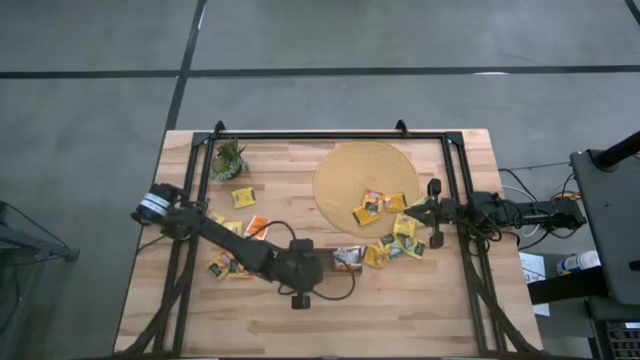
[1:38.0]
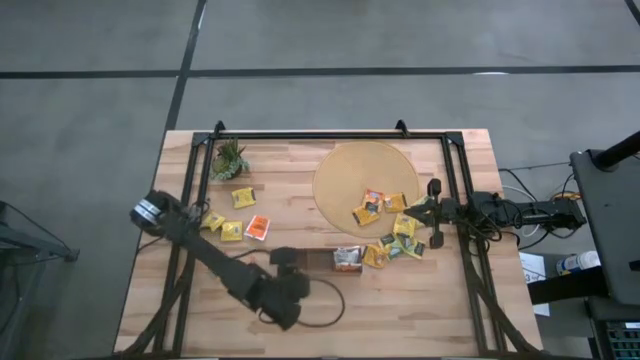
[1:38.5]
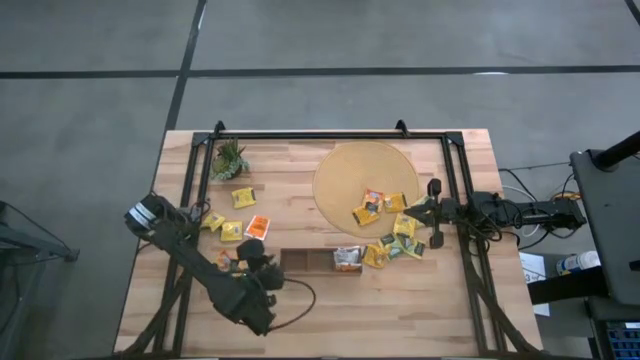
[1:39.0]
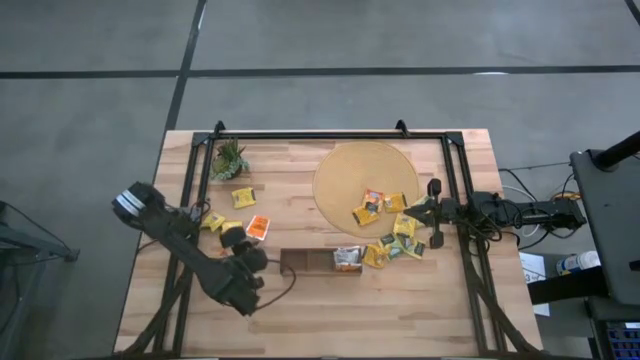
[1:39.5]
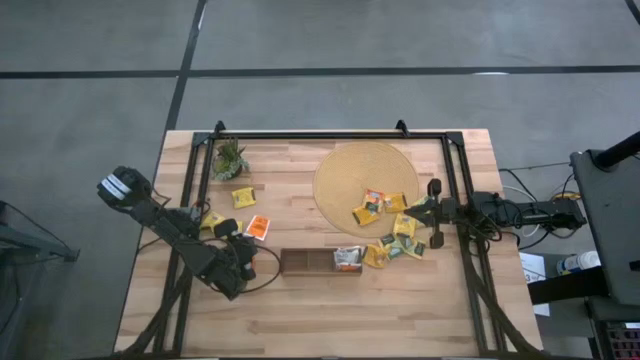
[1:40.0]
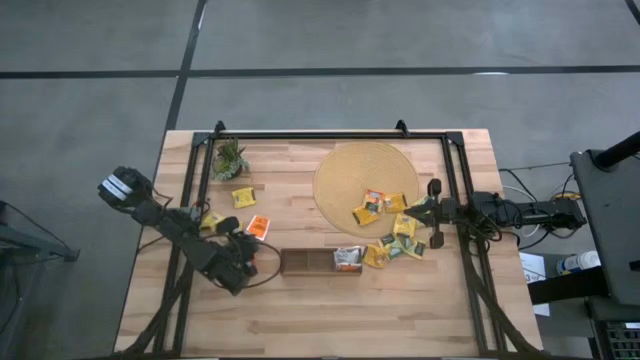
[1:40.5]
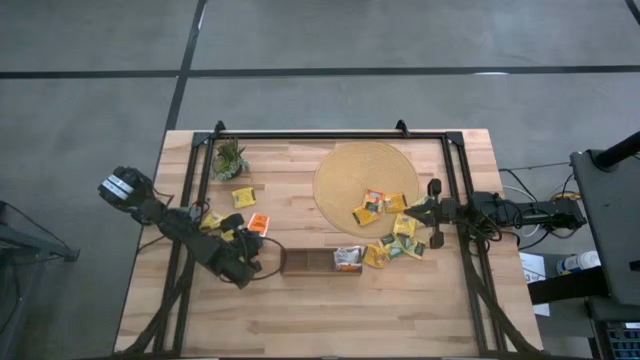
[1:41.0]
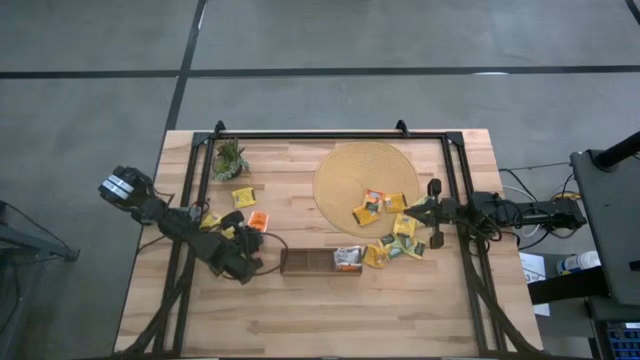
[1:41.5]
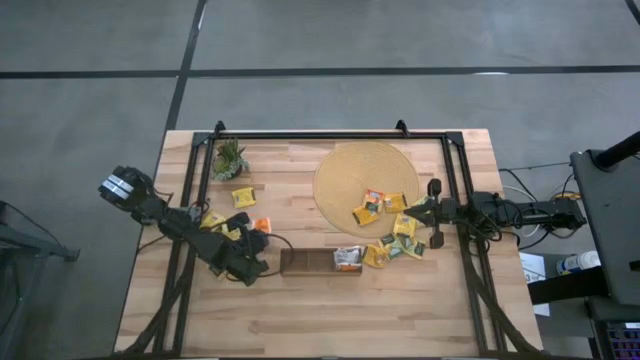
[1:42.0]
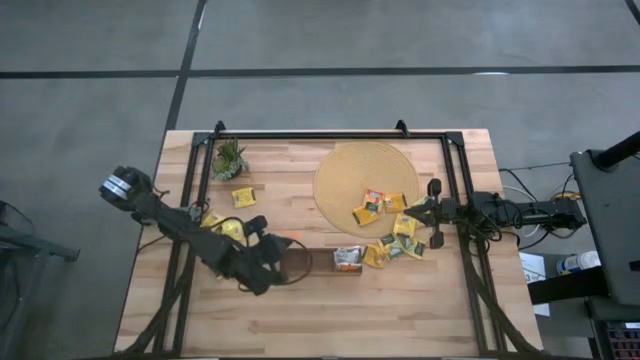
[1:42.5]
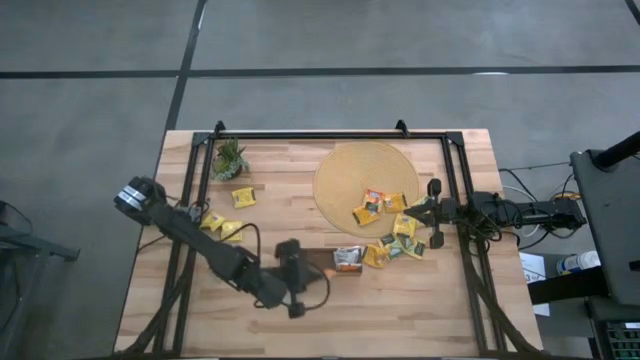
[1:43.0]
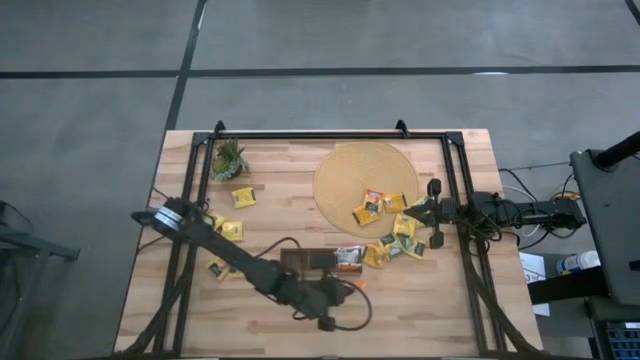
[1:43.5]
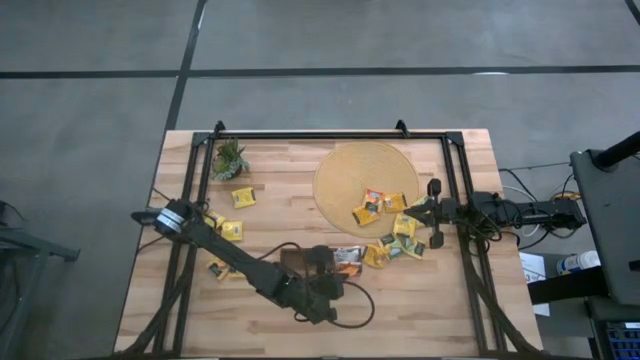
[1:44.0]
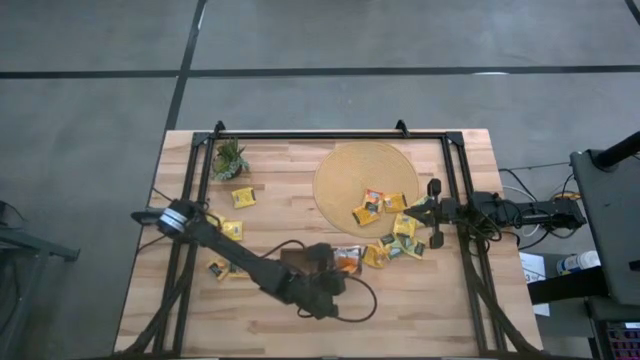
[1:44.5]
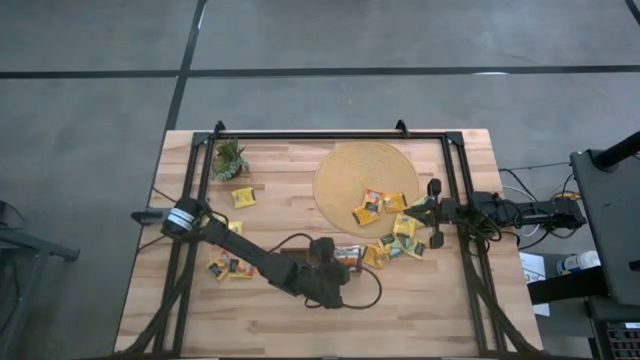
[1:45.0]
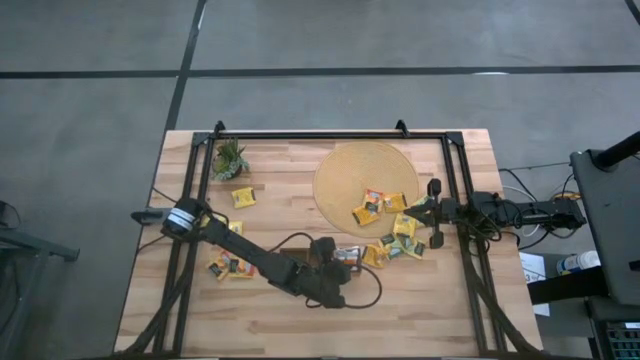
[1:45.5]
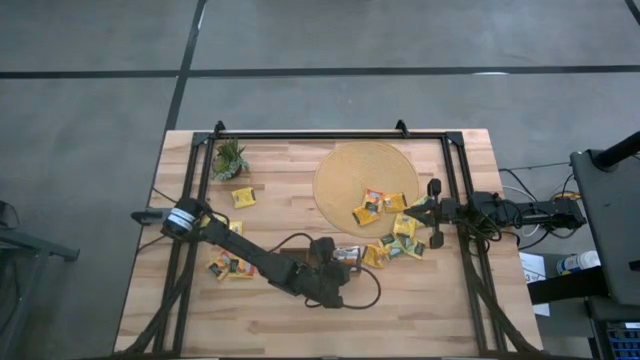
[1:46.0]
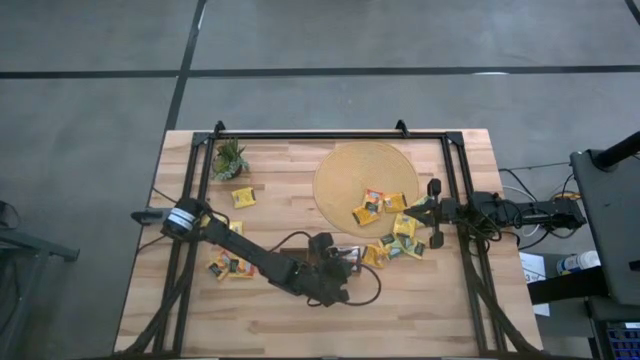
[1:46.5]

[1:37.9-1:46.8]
Task: Pick & Place Tea
Put the white tea bag into the right section of the wooden organizer

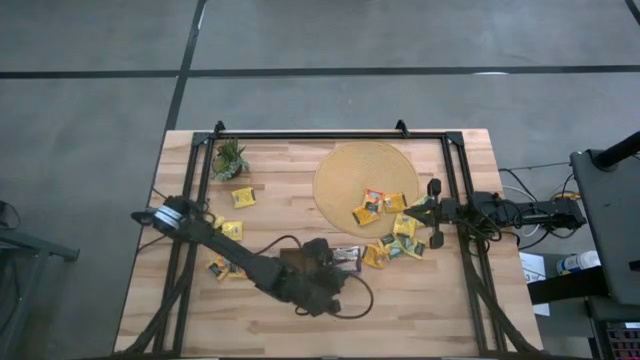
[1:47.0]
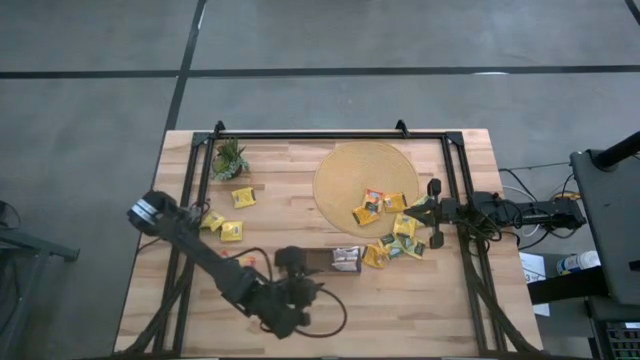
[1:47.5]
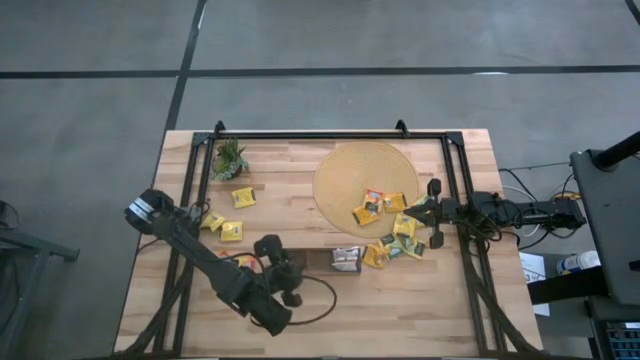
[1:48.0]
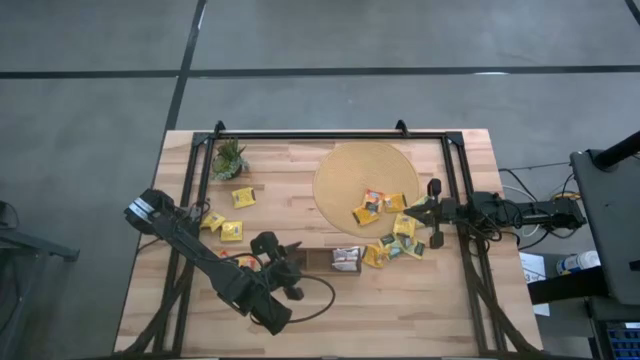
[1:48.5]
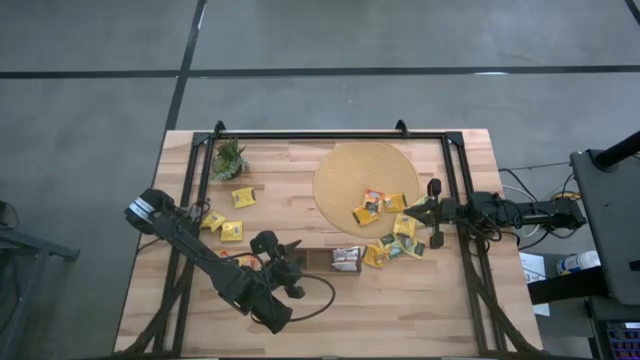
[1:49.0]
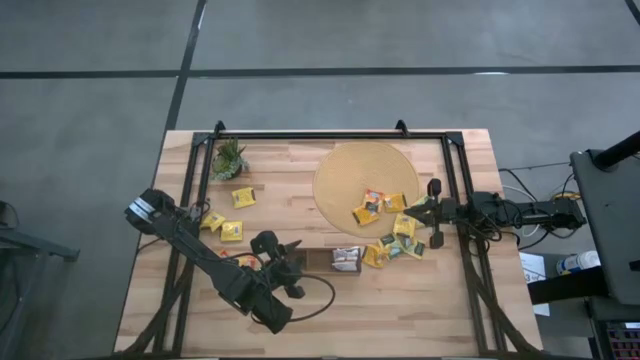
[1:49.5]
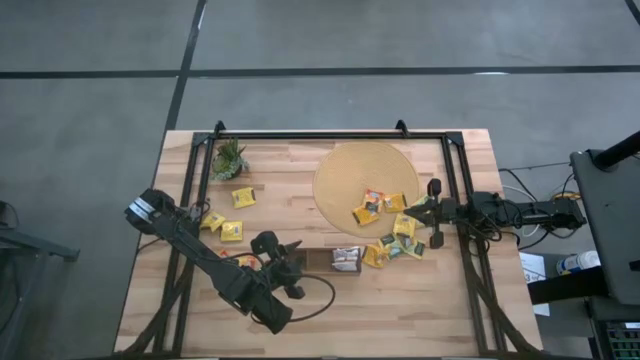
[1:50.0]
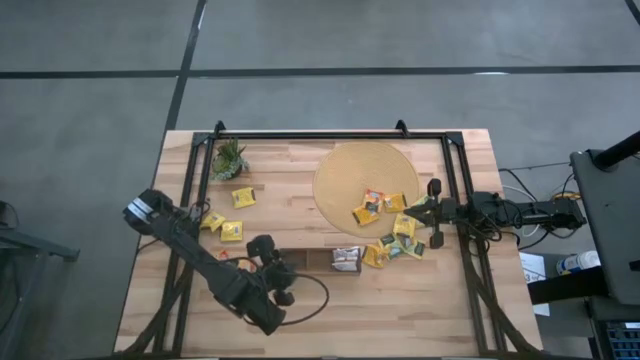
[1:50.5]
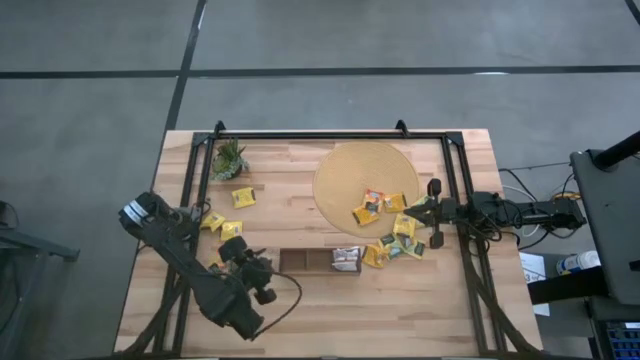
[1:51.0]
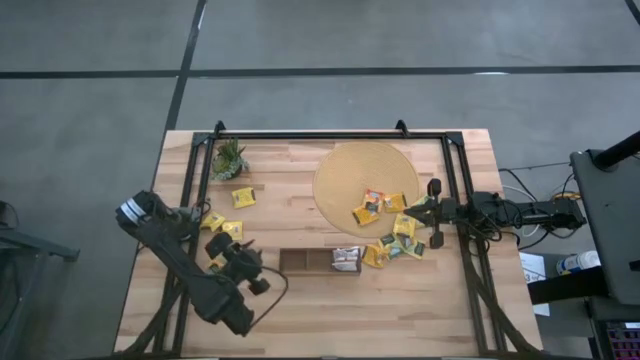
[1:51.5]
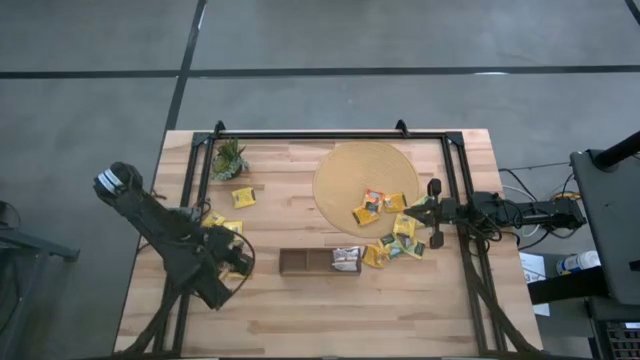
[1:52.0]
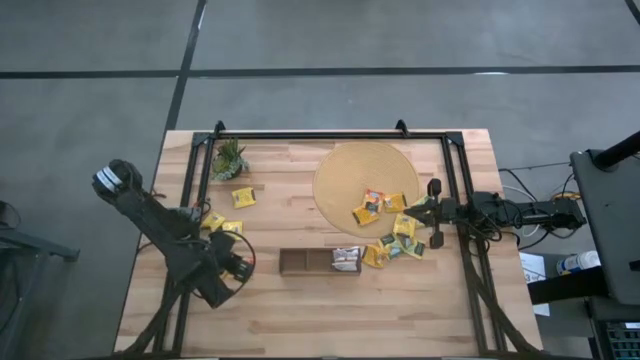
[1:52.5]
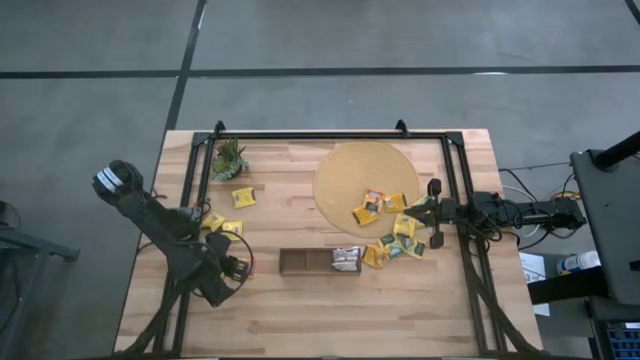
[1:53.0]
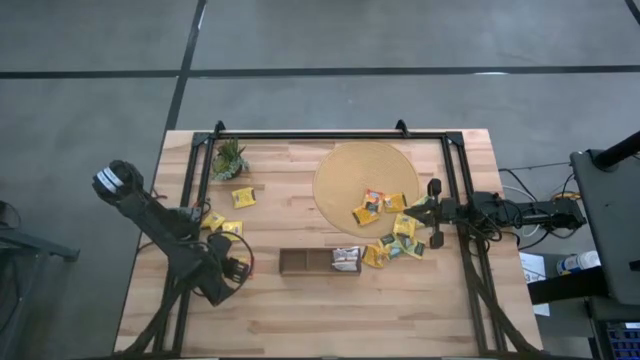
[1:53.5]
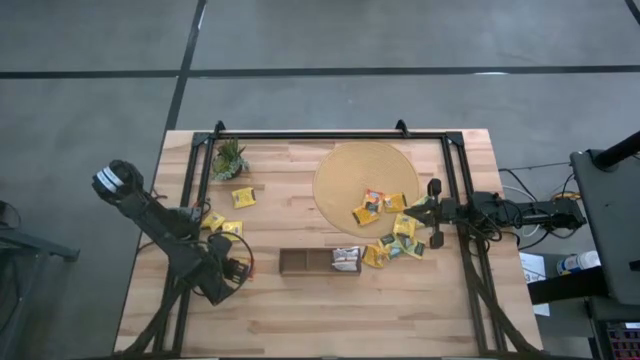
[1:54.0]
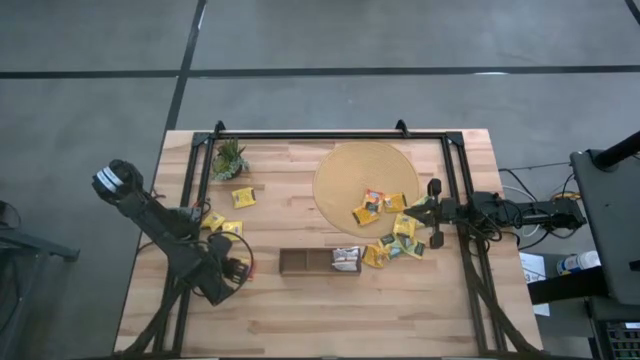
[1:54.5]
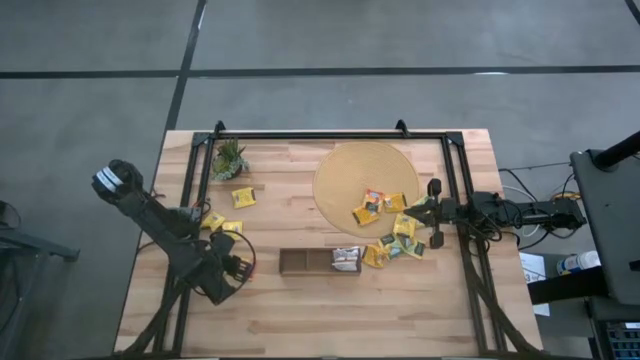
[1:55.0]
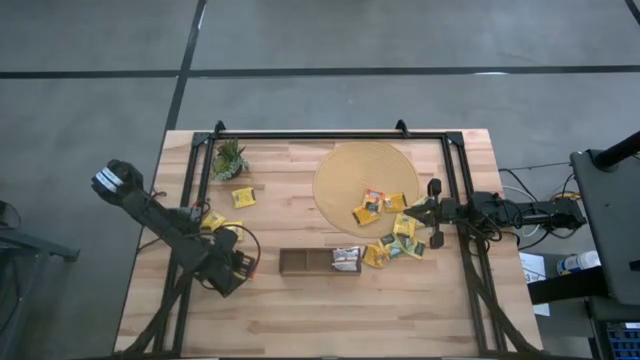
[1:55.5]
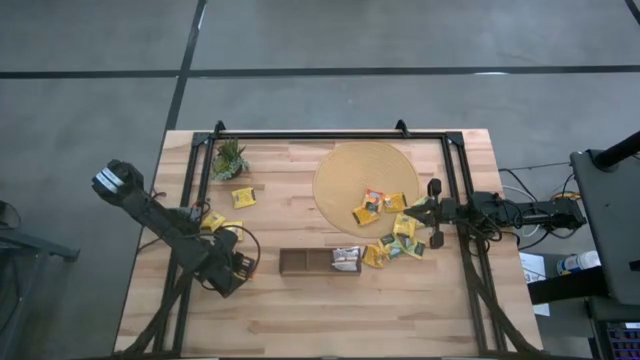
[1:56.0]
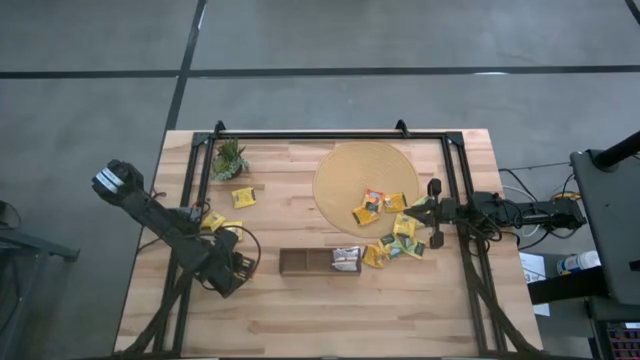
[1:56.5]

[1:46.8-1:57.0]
Put the orange tea bag into the middle section of the wooden organizer
